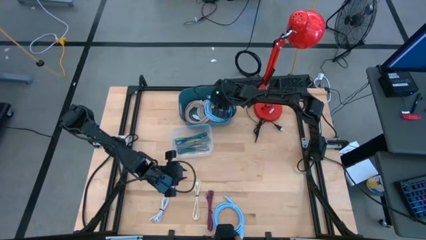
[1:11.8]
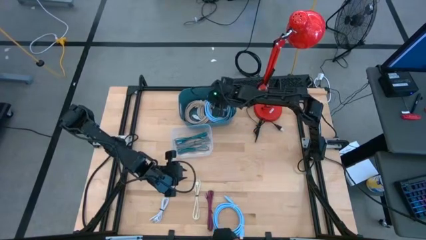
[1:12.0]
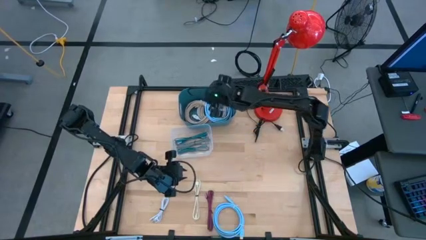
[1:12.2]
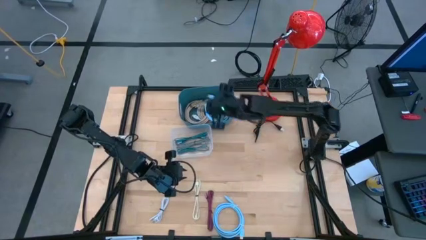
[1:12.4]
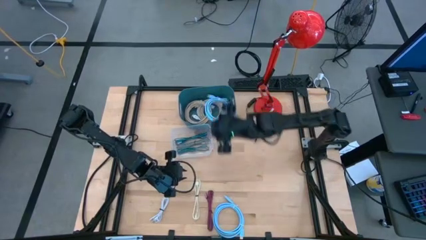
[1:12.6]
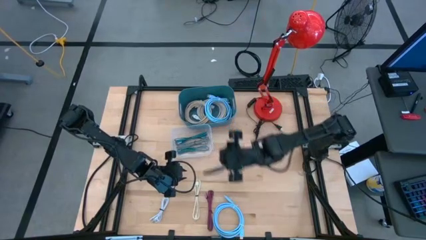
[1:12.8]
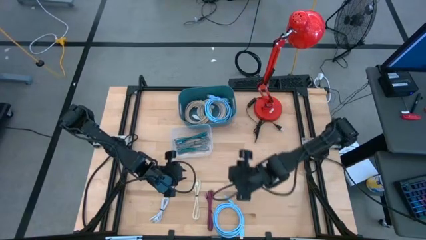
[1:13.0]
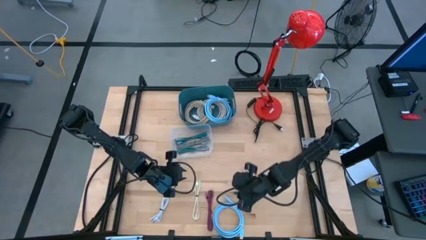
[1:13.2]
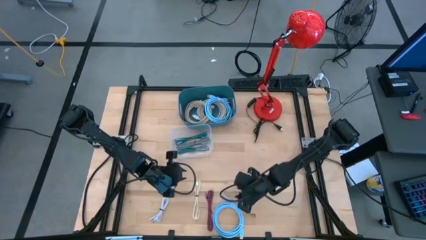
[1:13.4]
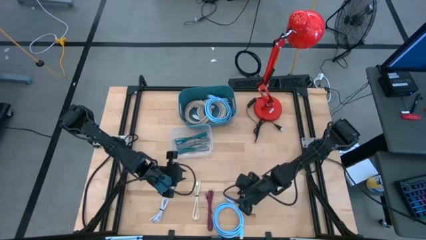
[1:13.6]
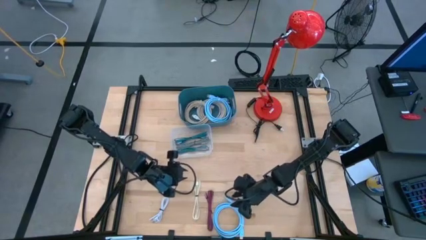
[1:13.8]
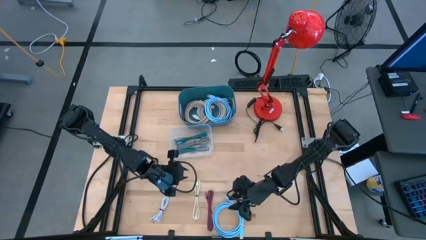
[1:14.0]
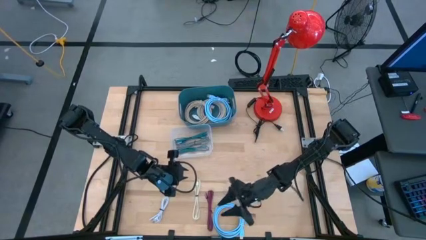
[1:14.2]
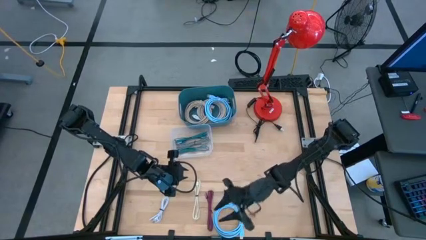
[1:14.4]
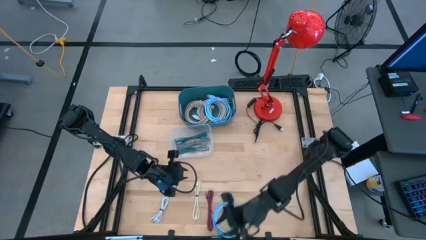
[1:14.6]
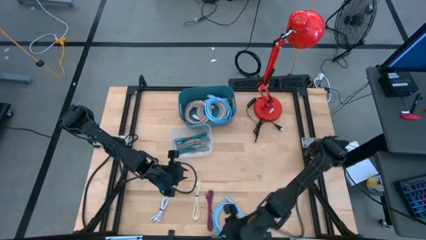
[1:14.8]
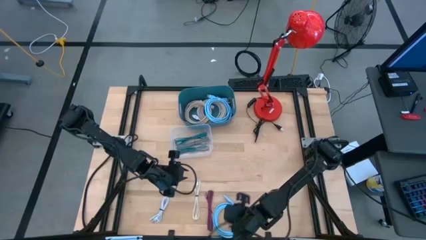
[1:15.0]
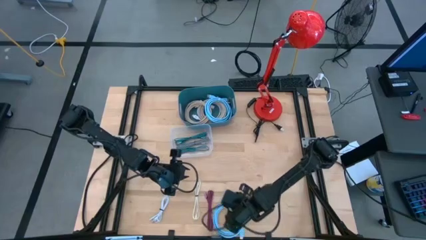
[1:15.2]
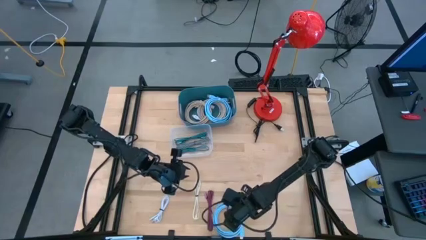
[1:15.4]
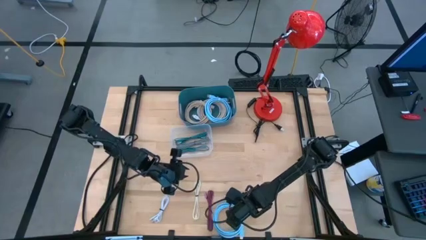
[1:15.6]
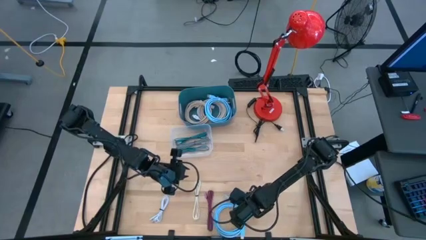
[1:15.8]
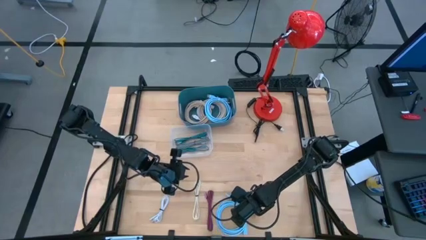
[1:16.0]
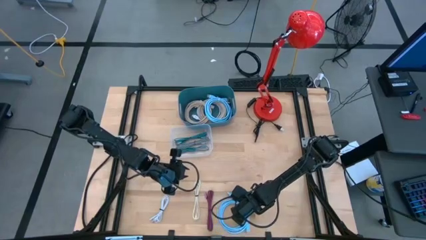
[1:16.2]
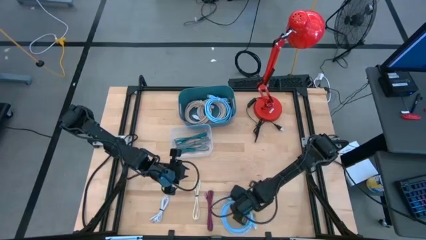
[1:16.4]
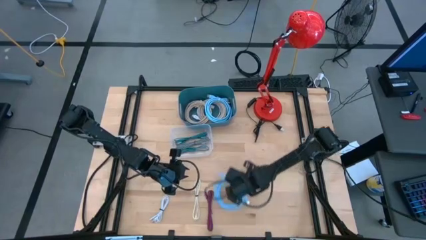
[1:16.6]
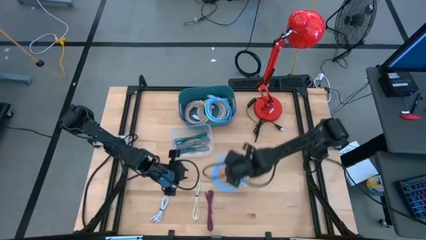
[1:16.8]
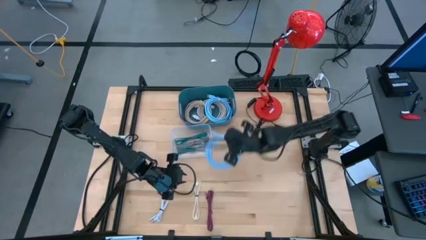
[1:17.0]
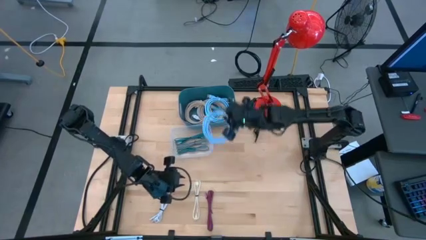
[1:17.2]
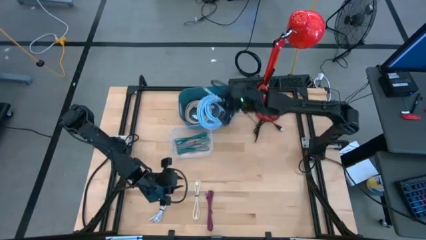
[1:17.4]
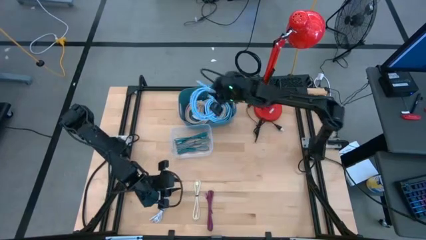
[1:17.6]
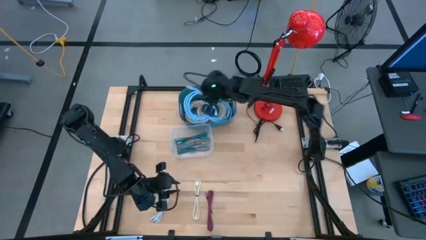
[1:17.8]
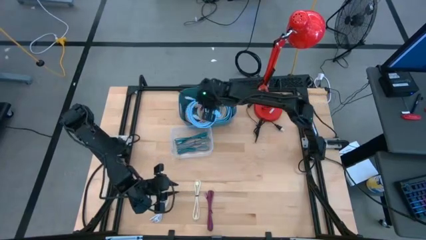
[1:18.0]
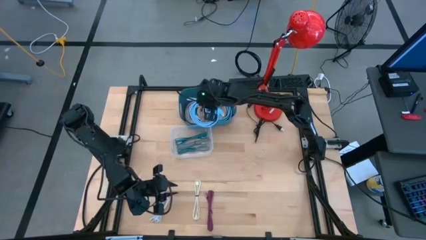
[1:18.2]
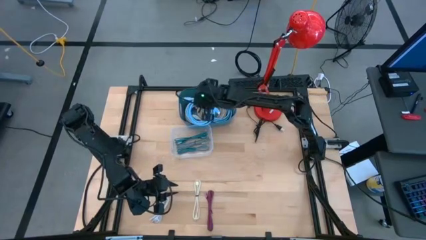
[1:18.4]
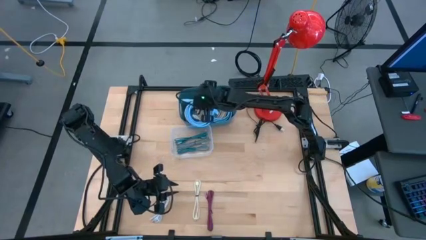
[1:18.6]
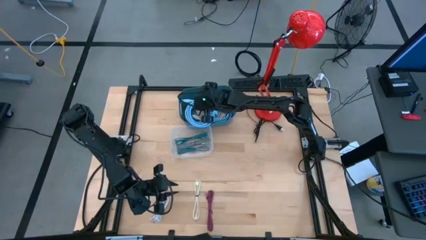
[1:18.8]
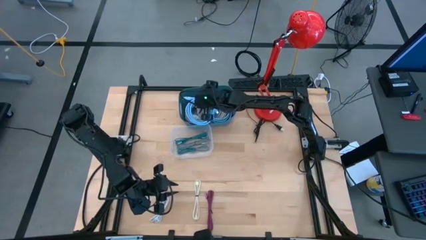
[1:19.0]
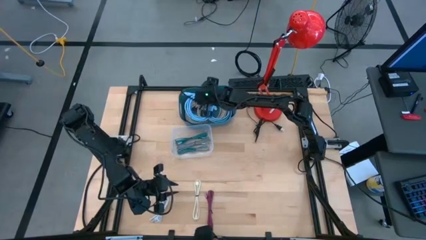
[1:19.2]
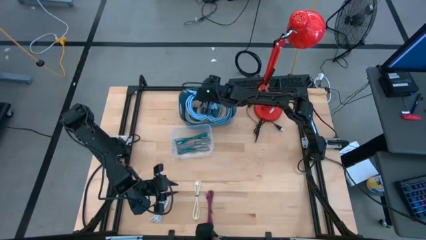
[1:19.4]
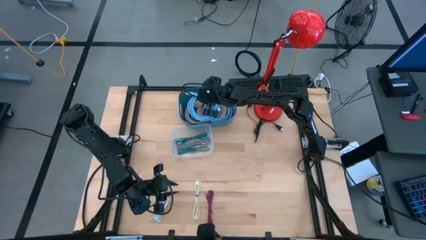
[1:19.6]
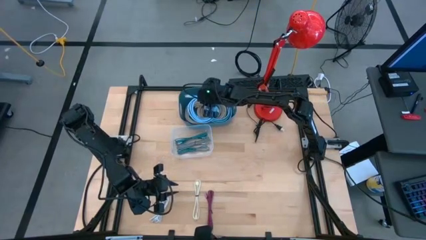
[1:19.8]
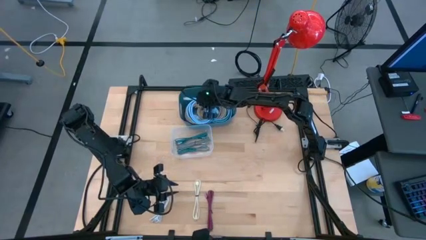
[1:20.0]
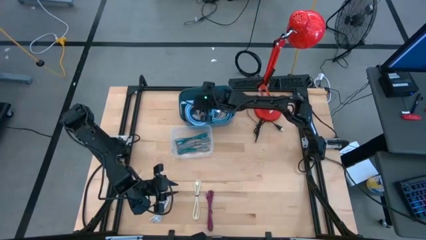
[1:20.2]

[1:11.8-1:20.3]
Task: Pick & Place USB Port
Put the blue USB cable into the dark blue bin

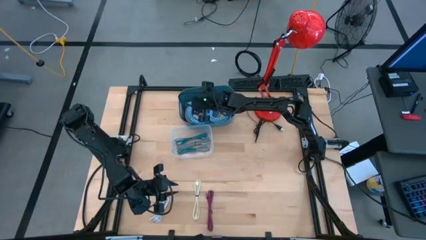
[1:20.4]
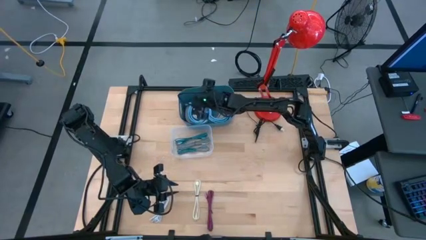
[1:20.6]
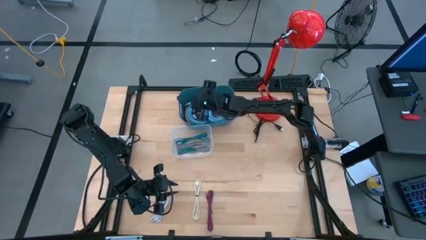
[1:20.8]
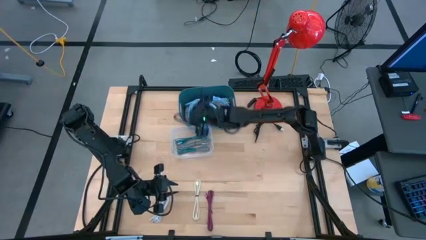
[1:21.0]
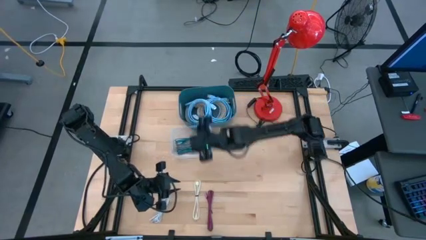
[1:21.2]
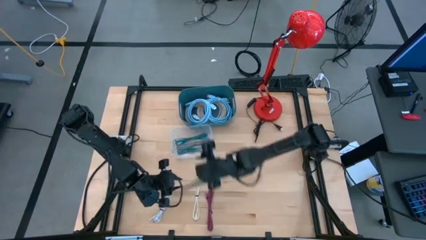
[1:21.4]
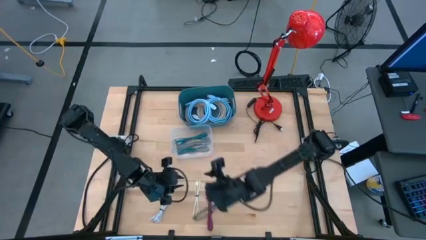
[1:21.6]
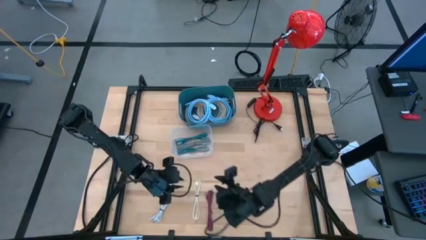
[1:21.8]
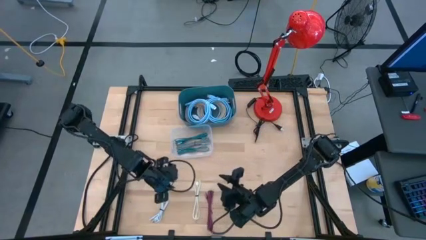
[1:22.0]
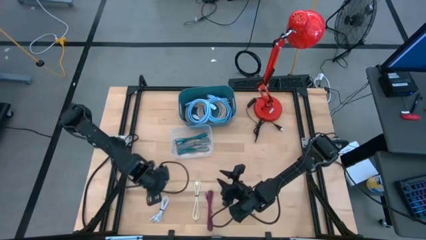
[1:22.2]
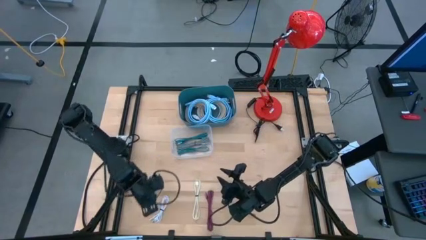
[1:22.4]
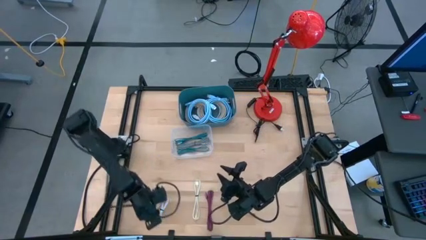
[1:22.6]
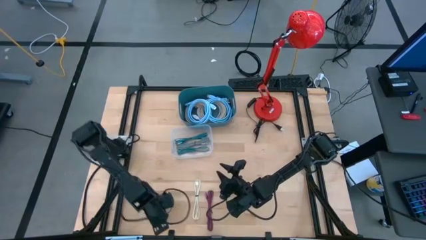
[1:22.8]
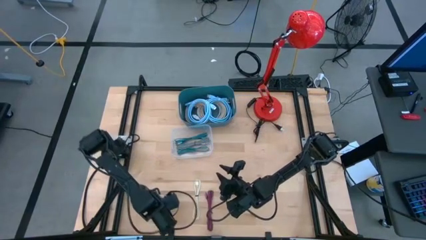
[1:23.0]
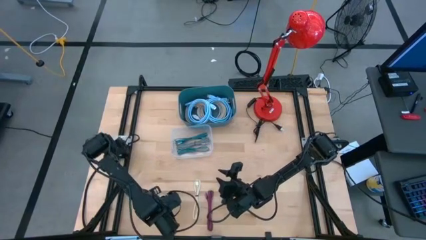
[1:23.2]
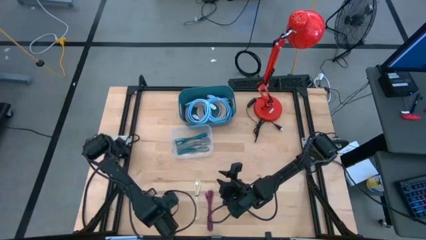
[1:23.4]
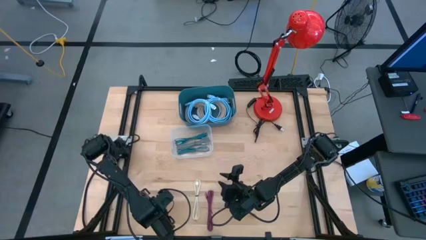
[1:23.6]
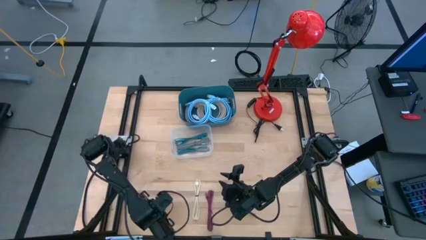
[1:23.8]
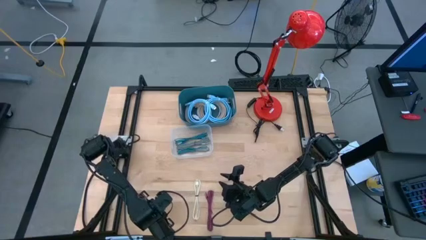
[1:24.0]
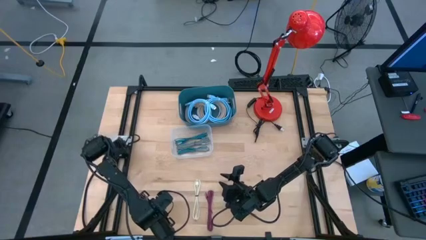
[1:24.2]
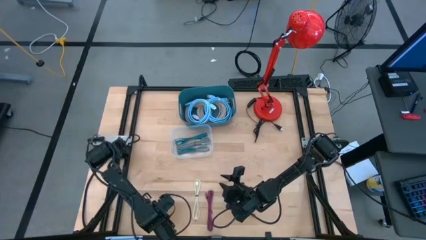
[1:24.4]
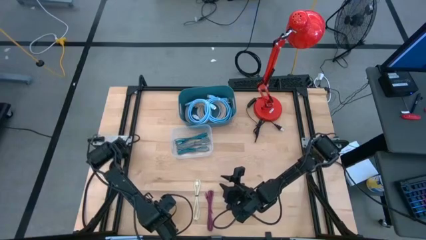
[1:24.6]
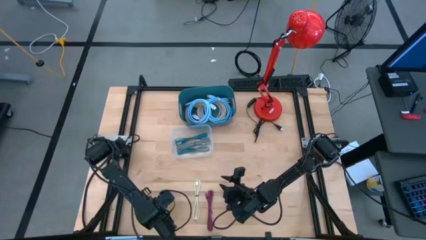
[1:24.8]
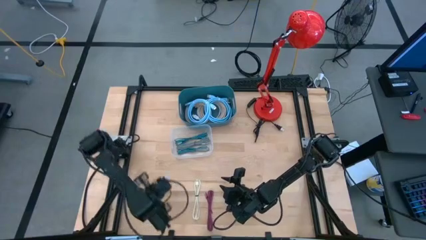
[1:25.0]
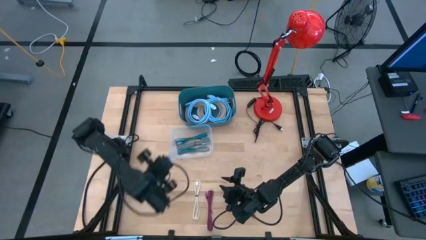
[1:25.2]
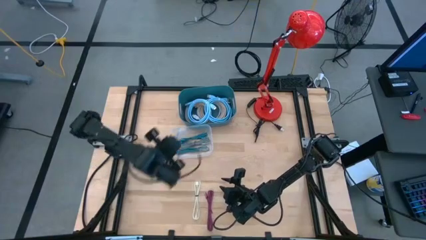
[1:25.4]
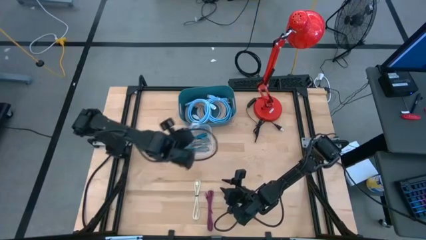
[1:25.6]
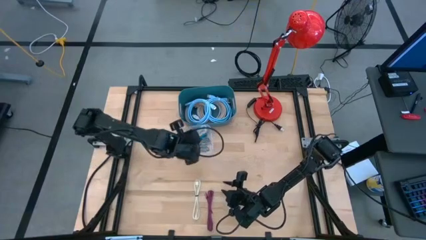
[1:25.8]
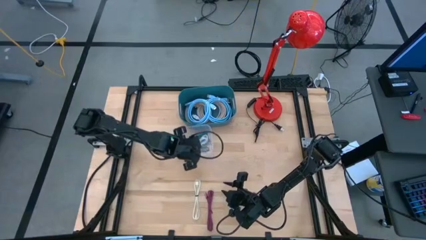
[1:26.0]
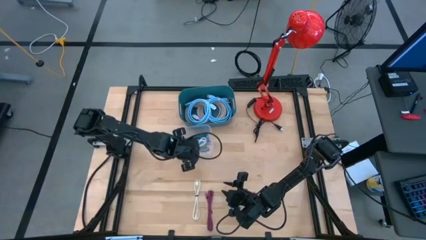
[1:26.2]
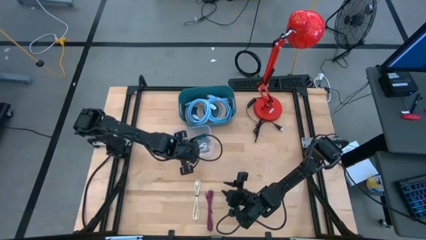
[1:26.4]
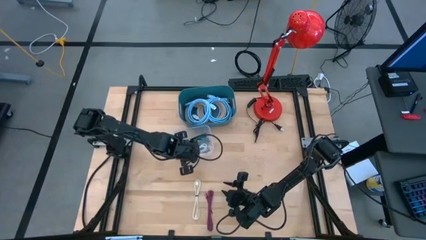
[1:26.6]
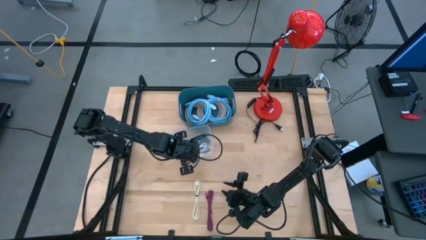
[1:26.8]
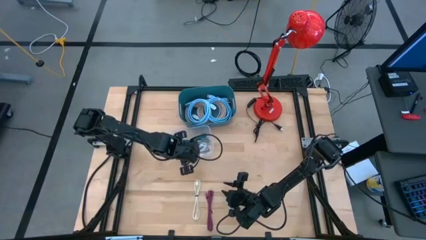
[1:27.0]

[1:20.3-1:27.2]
Put the white charger cable into the transparent bin
